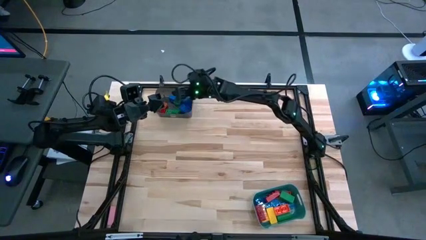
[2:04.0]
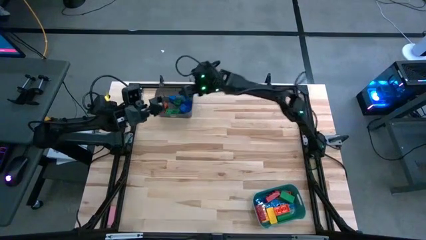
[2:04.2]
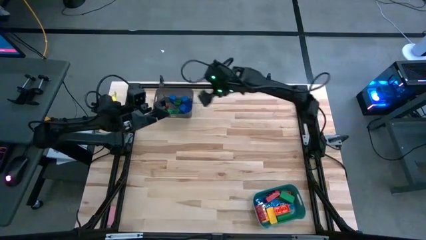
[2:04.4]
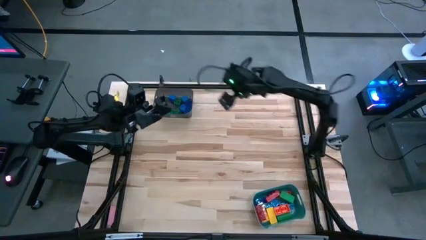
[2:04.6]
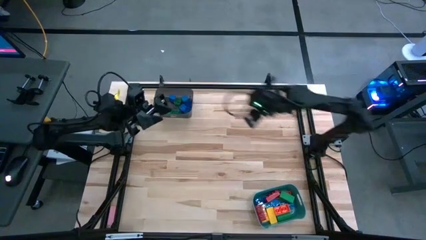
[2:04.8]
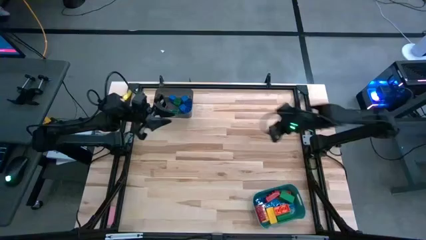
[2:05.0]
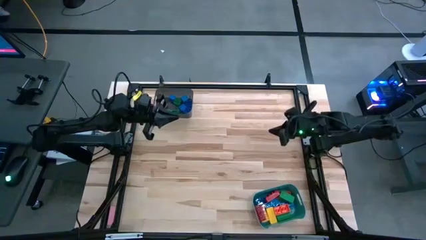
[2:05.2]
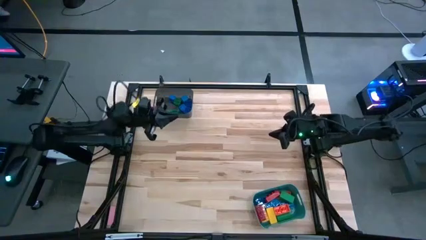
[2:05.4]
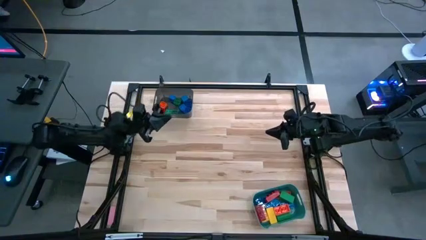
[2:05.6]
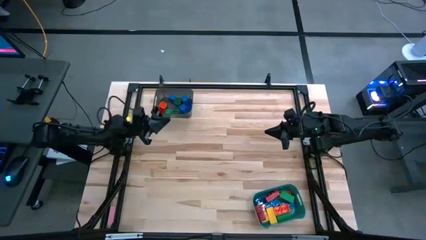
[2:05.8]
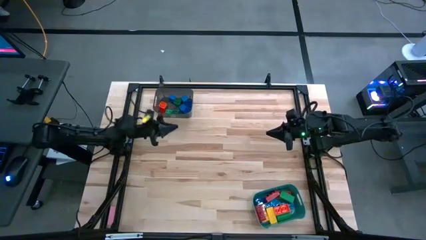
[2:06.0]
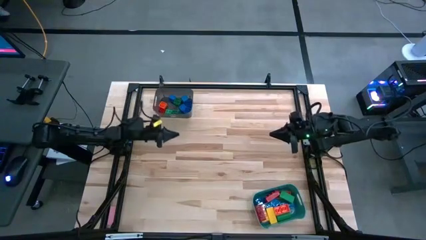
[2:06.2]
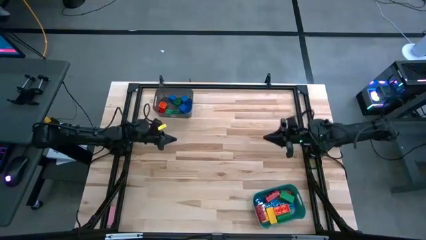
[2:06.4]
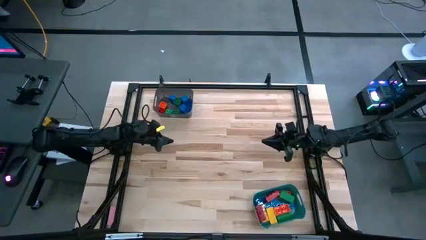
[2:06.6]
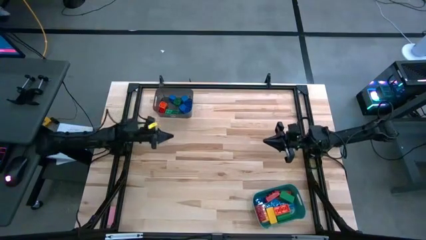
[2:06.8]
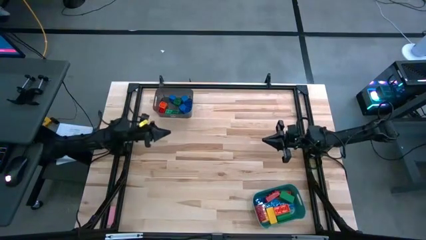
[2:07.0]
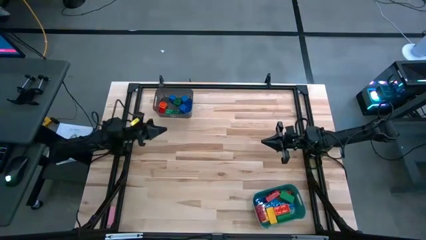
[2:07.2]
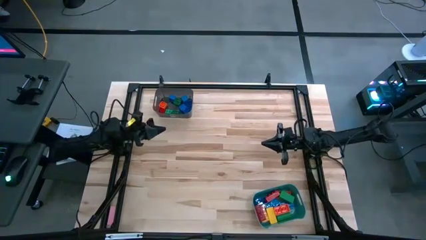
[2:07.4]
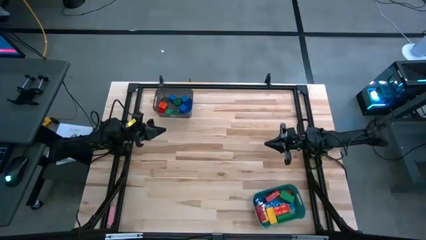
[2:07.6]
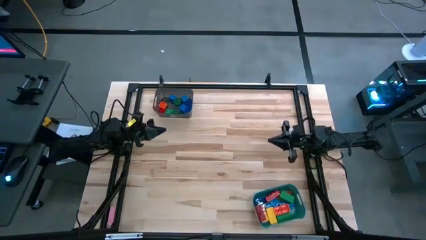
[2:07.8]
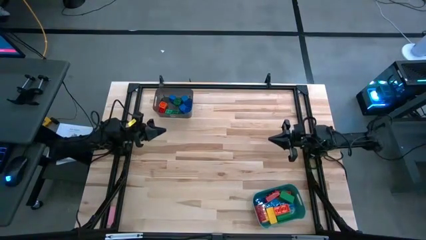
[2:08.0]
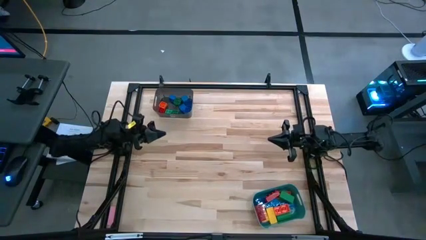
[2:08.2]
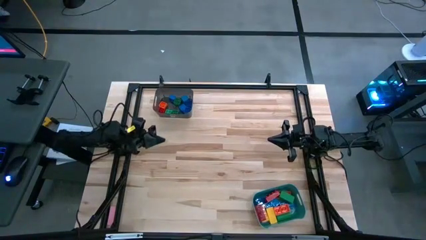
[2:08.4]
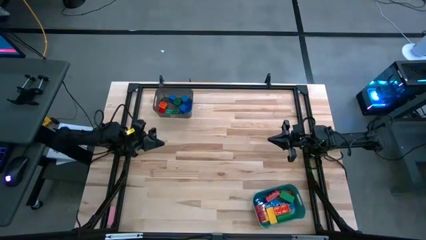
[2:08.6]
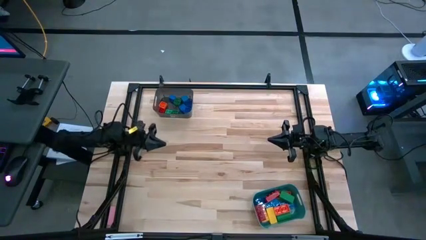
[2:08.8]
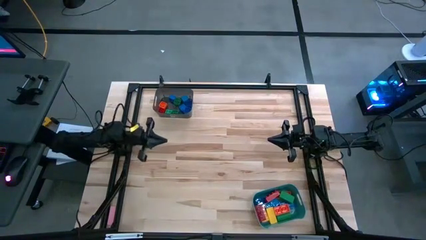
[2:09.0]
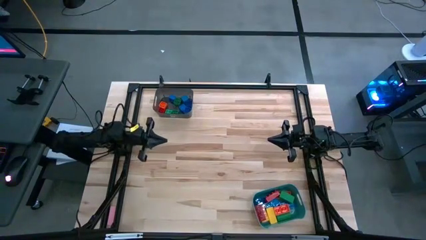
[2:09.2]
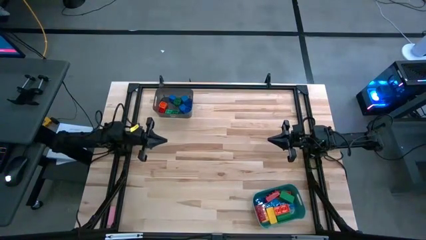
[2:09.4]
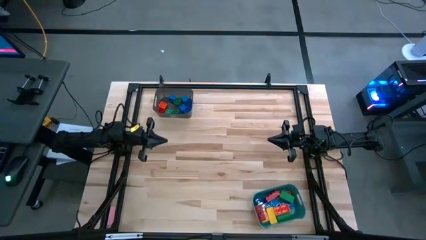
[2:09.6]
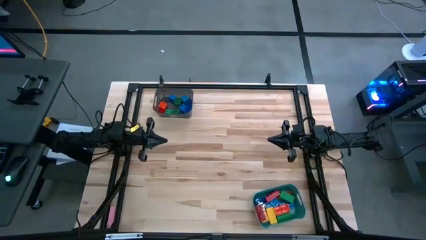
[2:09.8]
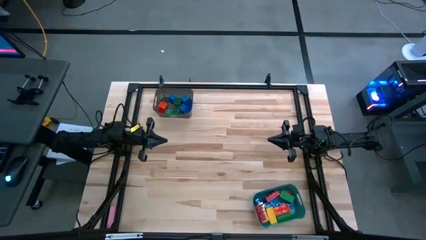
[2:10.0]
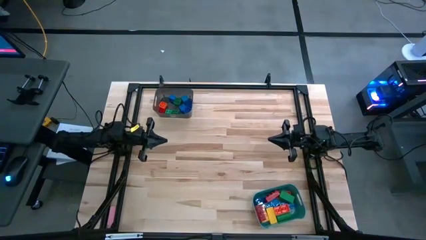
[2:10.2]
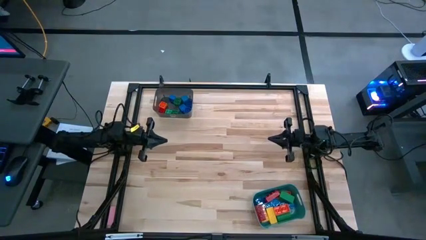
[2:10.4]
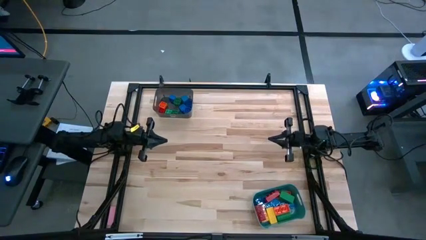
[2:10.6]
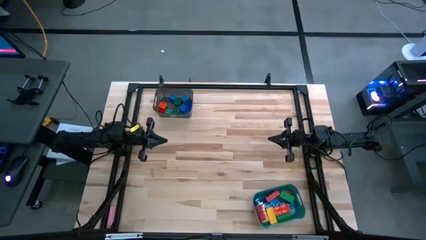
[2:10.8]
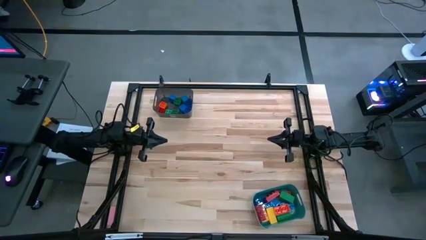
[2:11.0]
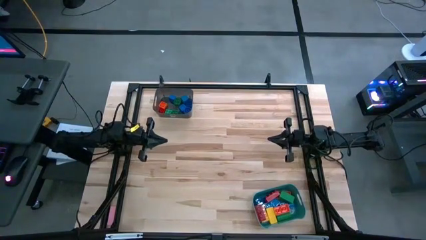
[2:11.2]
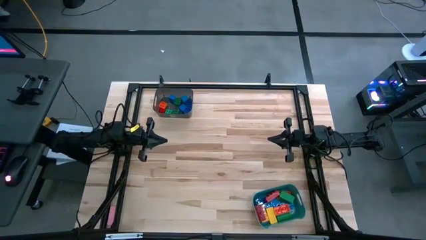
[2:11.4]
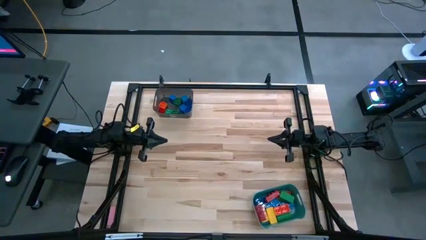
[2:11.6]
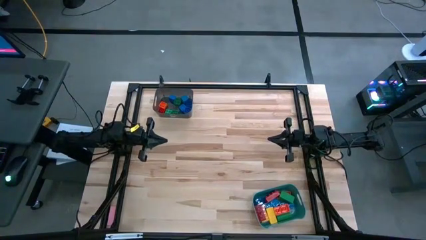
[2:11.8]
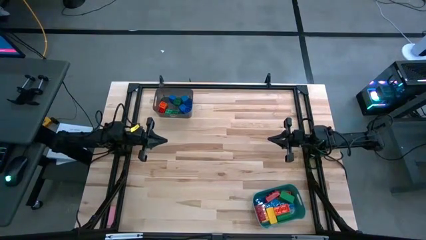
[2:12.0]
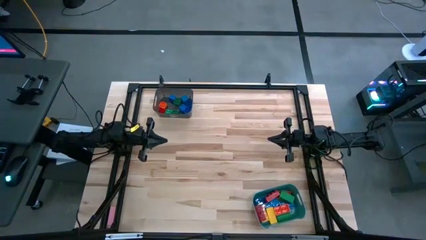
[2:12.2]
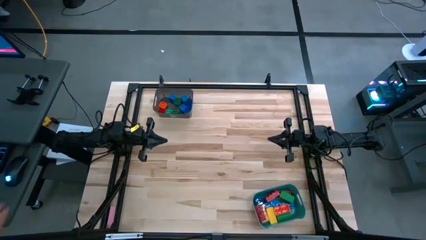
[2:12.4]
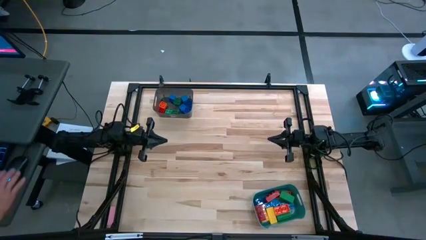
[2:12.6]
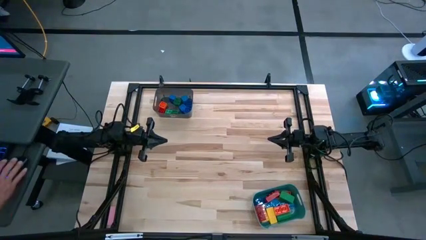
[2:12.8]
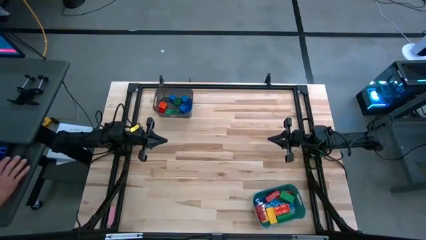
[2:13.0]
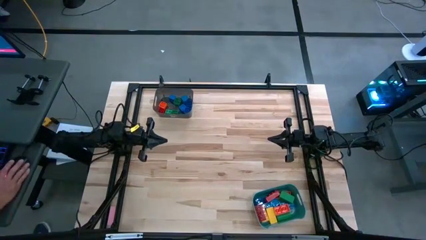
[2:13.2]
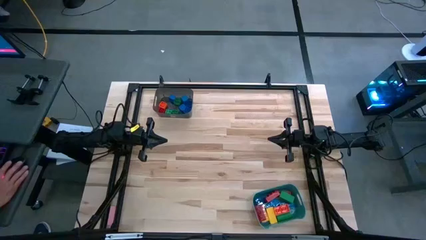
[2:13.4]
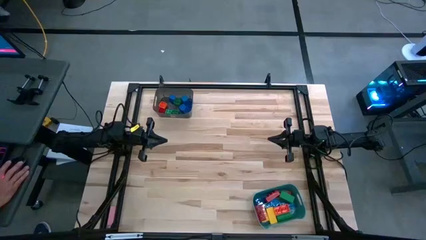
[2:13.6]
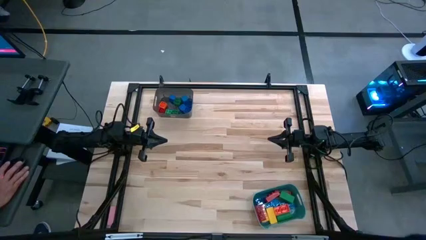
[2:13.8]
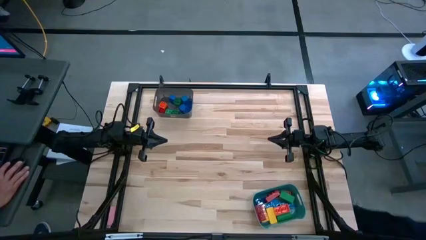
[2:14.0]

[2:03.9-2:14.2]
Task: Sort blocks by size
Return to Home Position

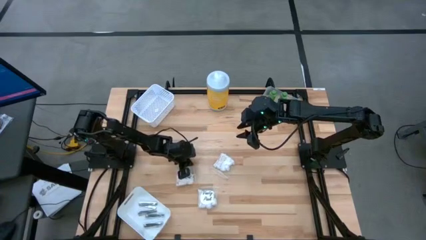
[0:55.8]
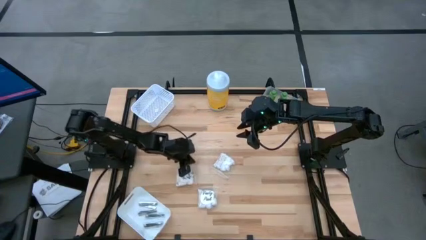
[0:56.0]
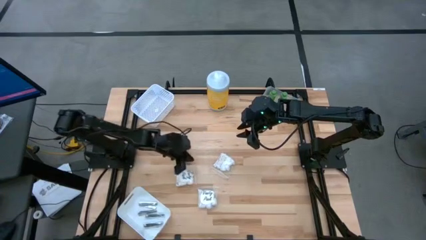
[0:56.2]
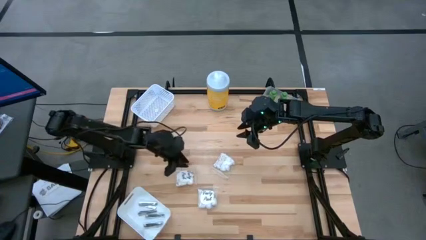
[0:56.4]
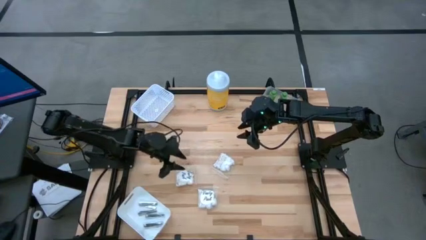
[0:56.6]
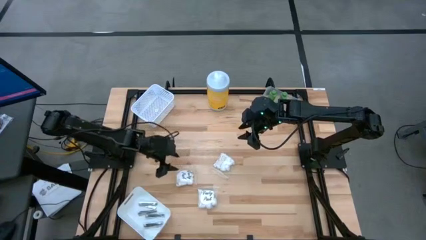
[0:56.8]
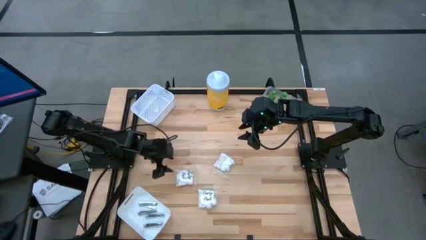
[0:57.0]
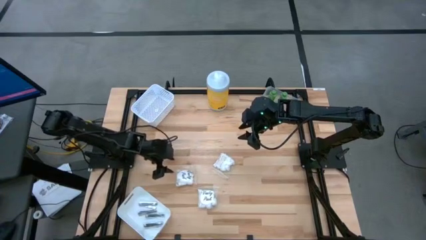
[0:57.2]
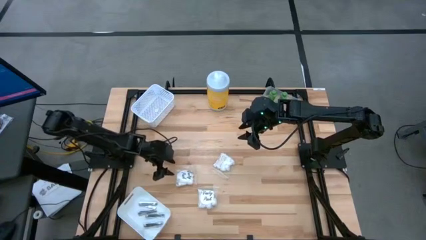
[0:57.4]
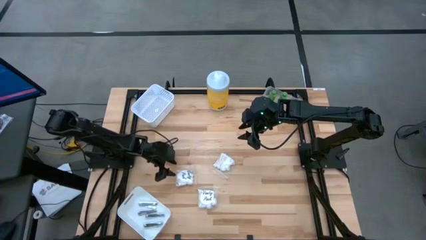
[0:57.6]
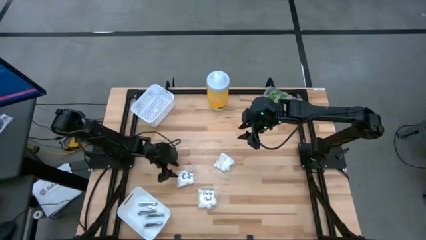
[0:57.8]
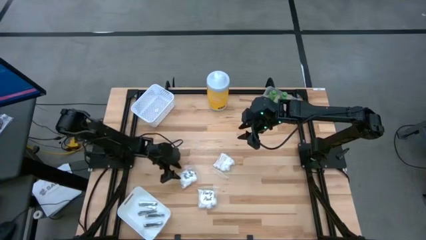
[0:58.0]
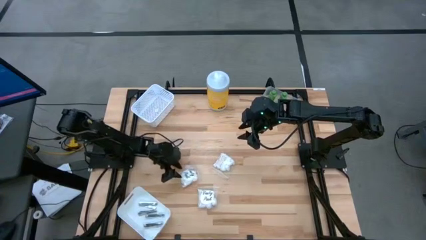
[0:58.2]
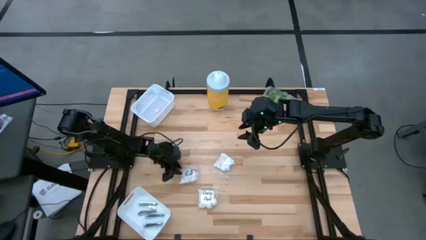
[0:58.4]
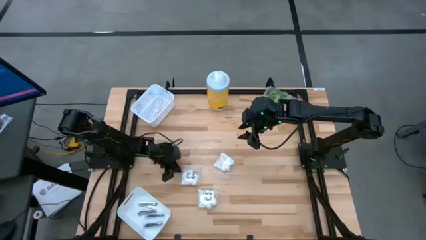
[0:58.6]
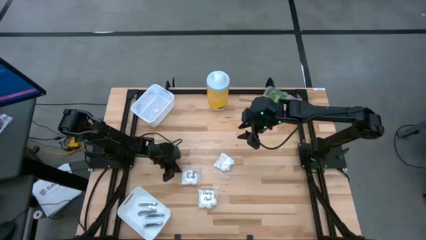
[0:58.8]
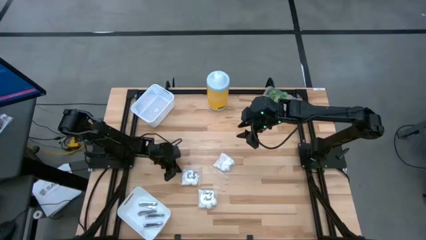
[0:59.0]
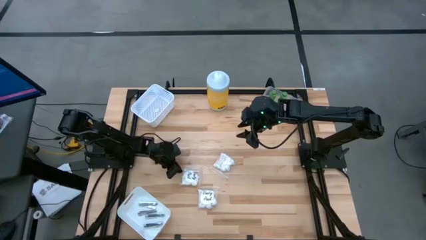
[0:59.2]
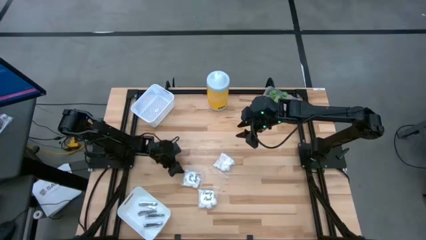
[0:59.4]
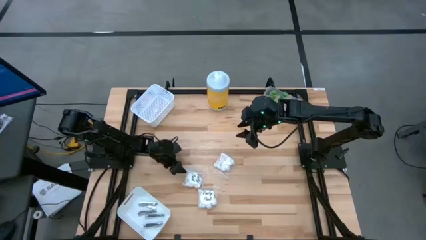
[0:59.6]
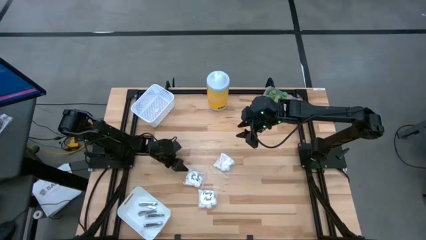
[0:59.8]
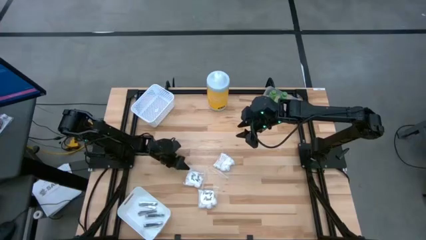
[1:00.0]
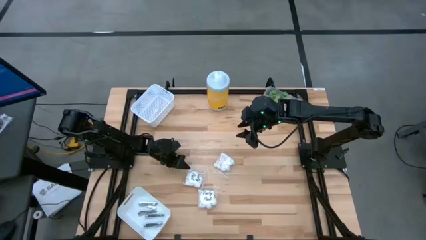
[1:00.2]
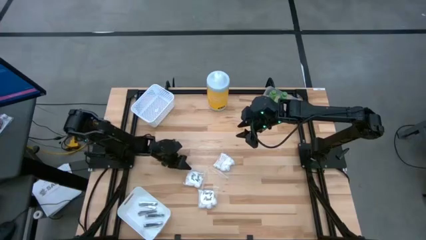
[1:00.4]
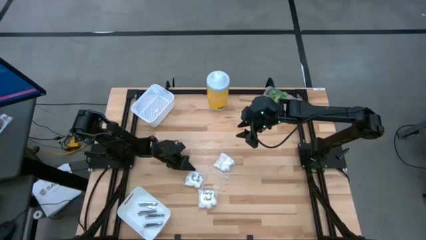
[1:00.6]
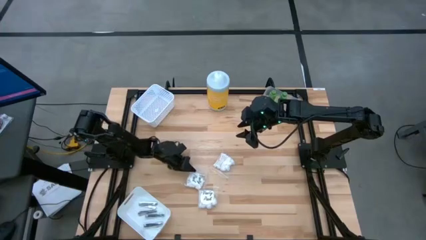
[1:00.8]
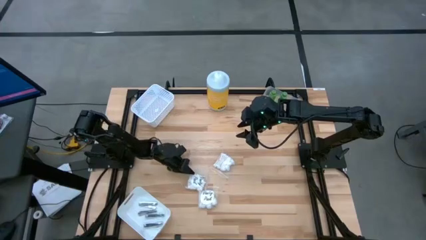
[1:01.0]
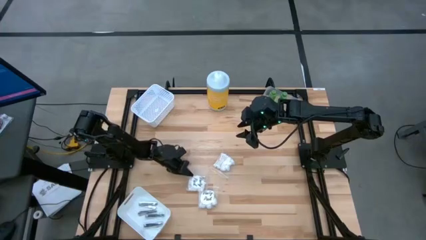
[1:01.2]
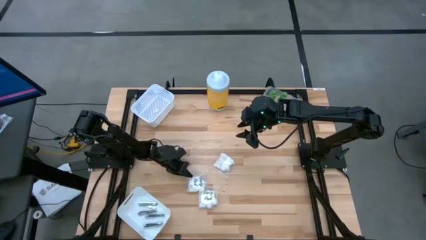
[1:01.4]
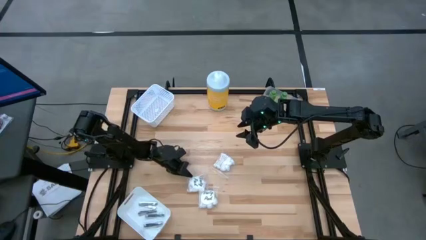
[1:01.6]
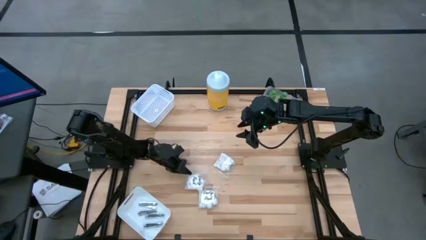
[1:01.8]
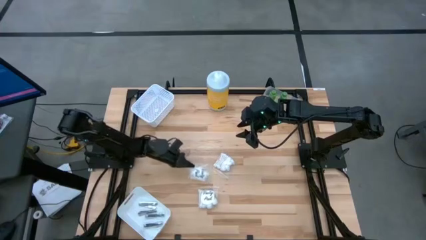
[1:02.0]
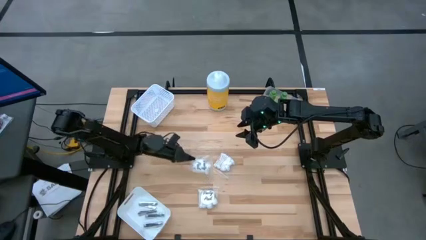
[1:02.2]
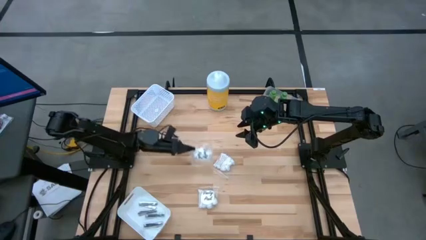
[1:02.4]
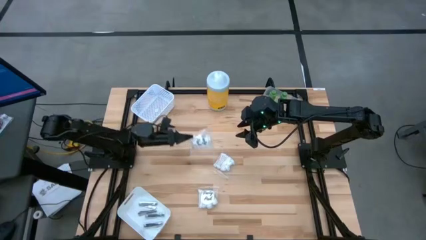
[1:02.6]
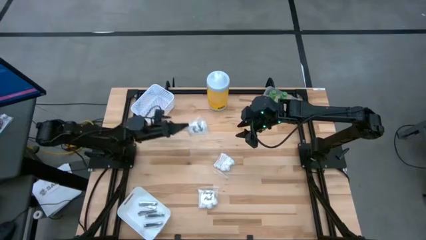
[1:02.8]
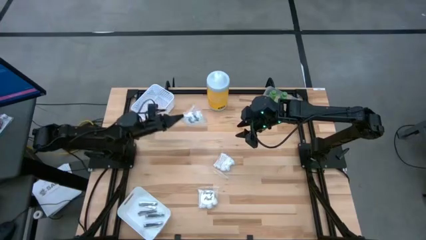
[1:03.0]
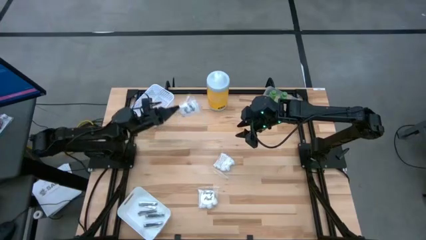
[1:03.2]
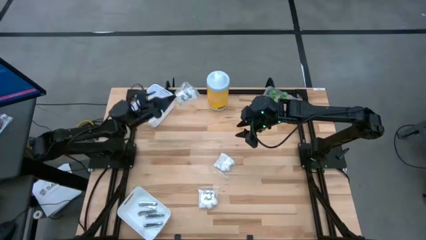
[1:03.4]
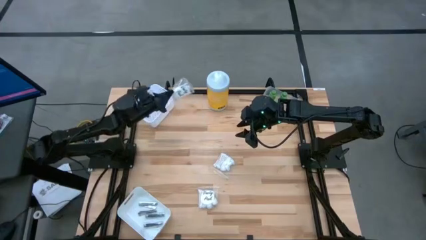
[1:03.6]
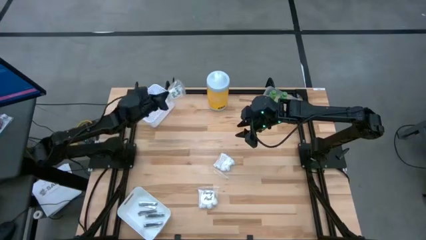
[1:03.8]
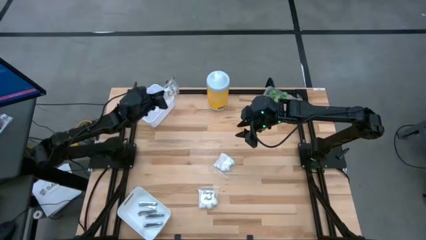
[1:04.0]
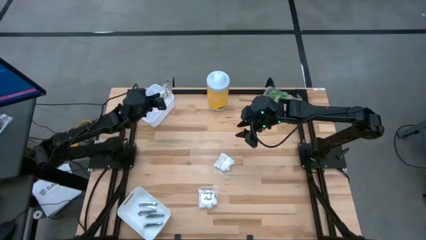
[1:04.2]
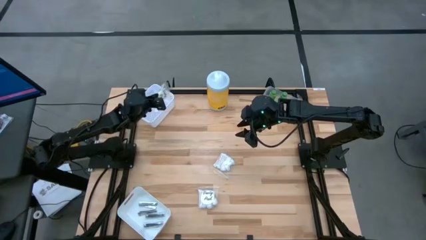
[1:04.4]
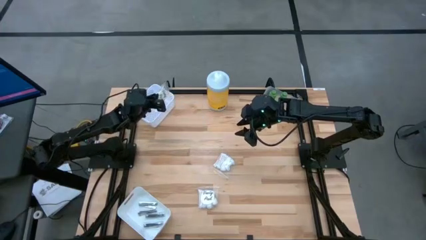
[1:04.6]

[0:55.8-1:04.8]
Task: Pick & Place Travel size toiletries
Put the white cotton pack into the white basket
